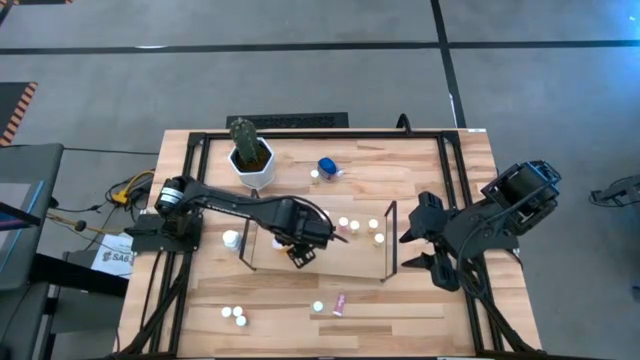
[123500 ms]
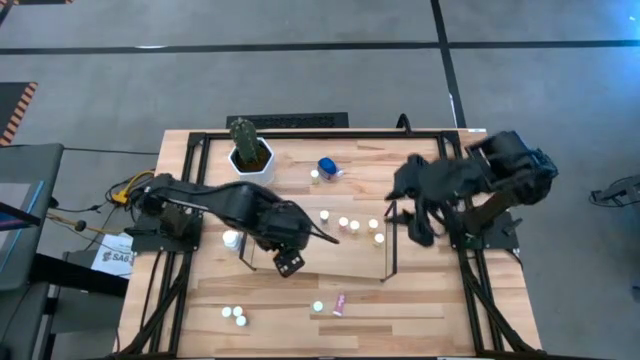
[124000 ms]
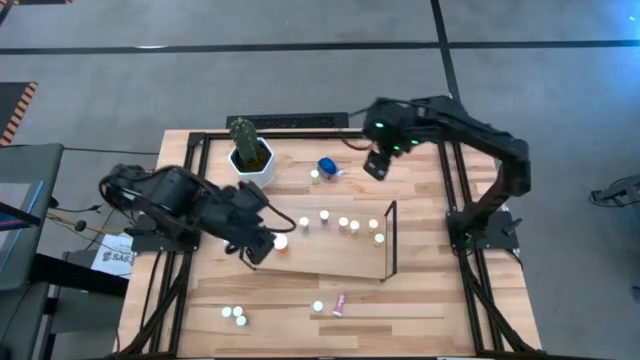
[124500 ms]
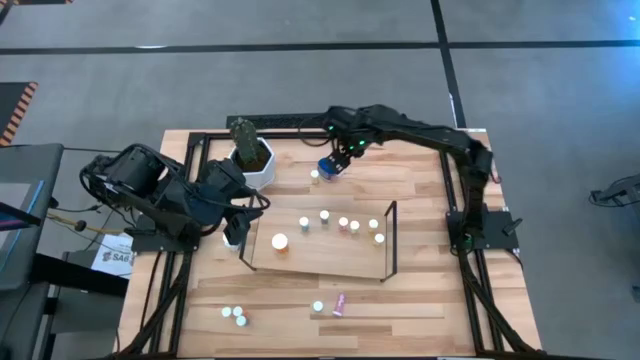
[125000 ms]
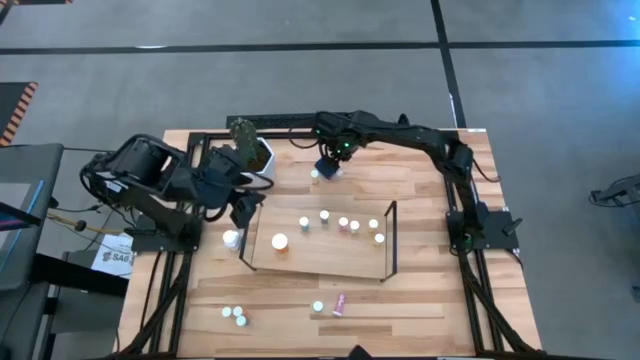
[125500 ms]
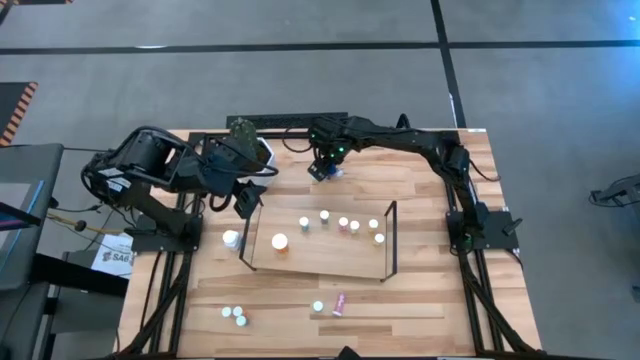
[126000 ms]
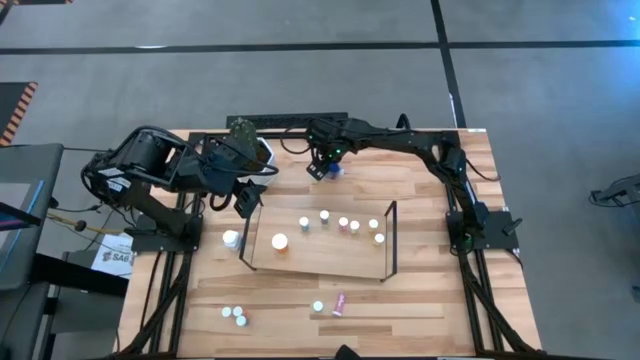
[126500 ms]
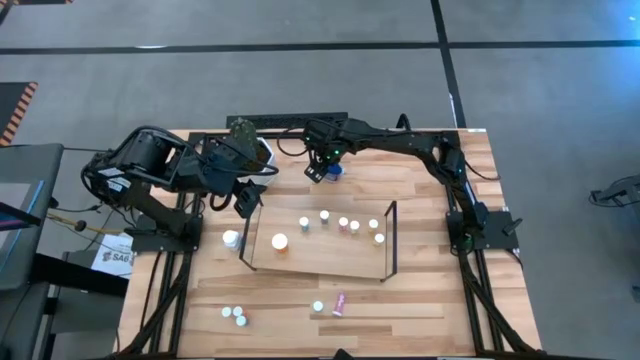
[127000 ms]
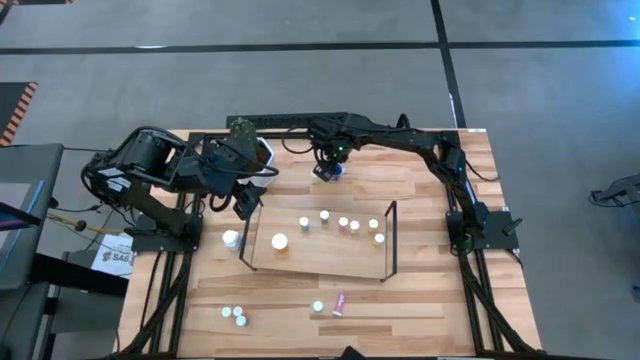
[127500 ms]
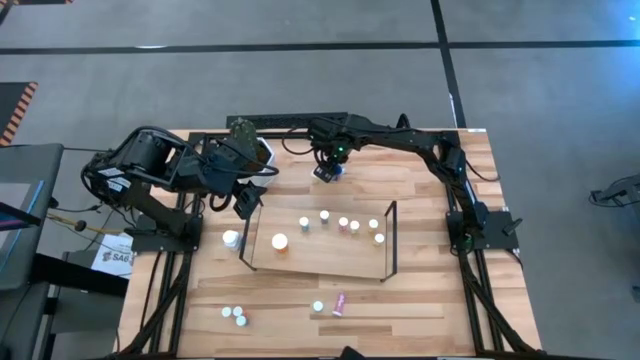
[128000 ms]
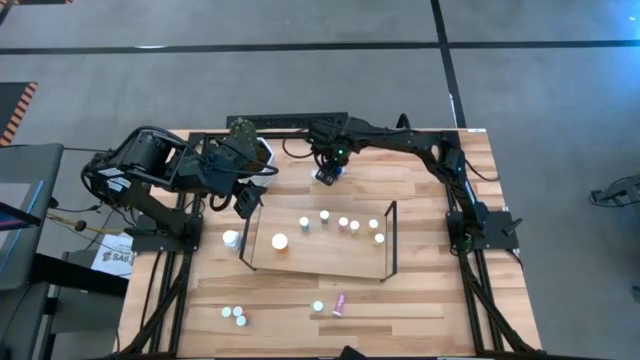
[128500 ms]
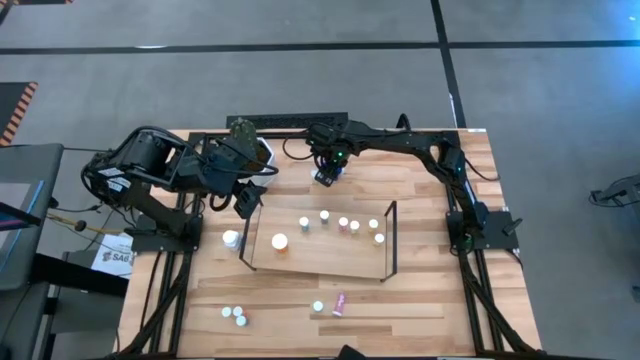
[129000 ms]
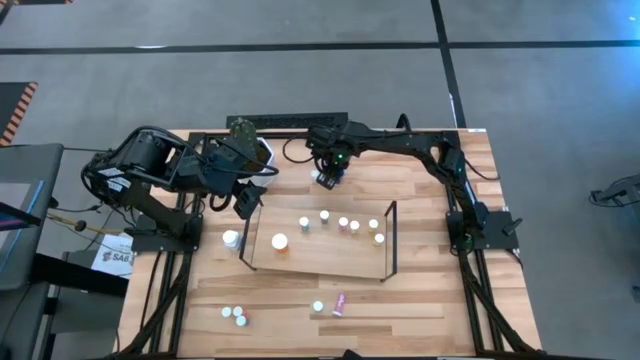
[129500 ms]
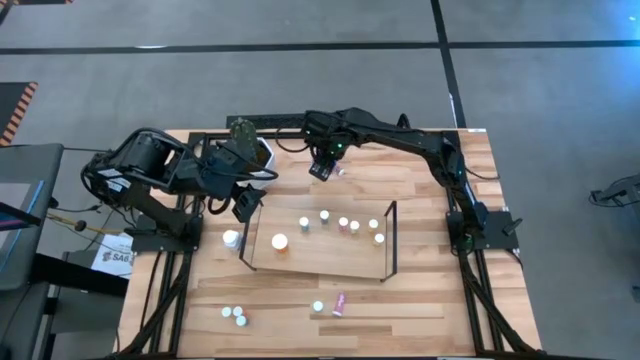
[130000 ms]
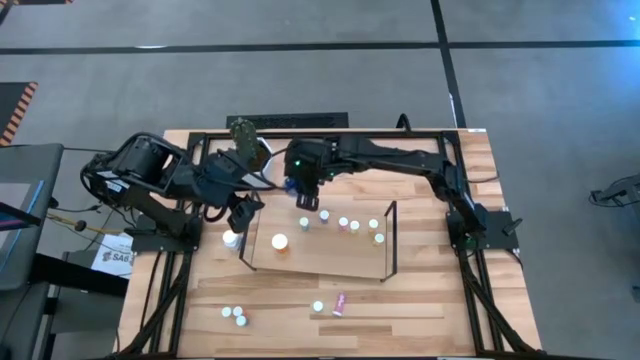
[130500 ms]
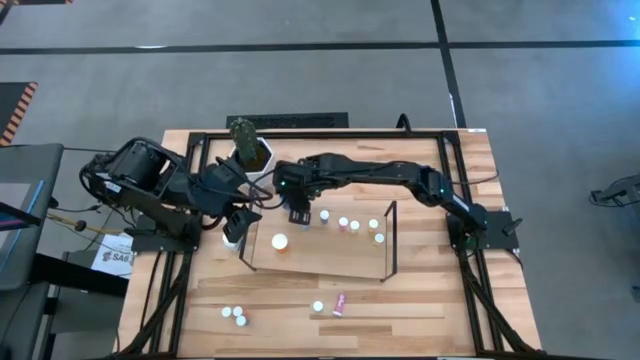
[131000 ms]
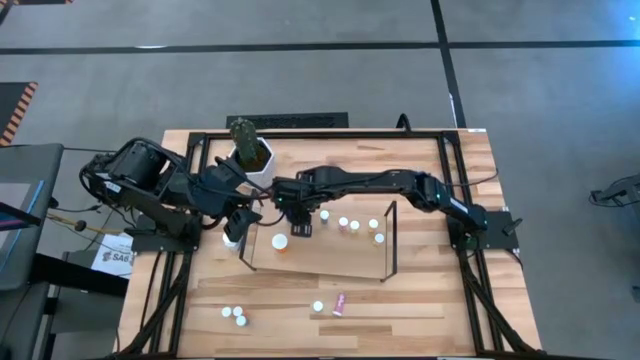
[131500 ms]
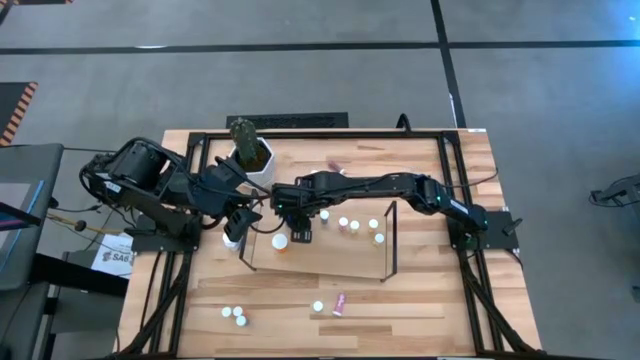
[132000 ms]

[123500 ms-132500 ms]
Task: Pick and place medicine bottles onto shelf by color
Put the large blue pill bottle on the shelf

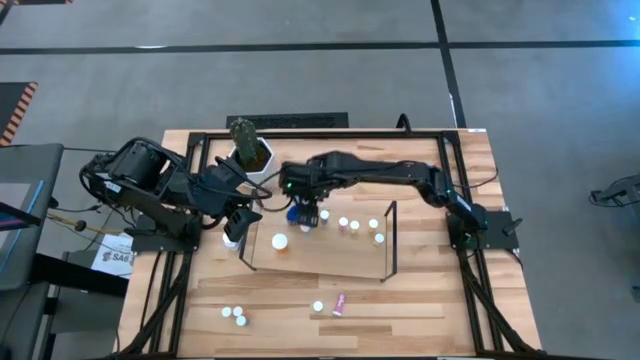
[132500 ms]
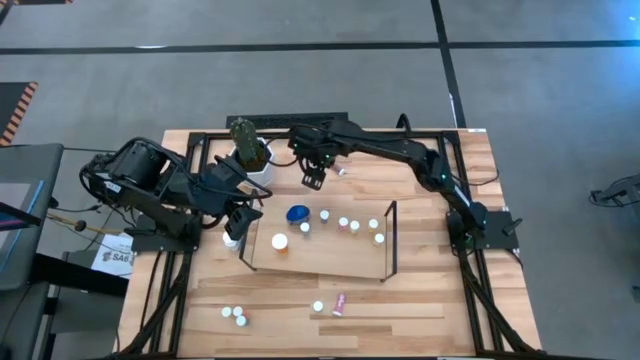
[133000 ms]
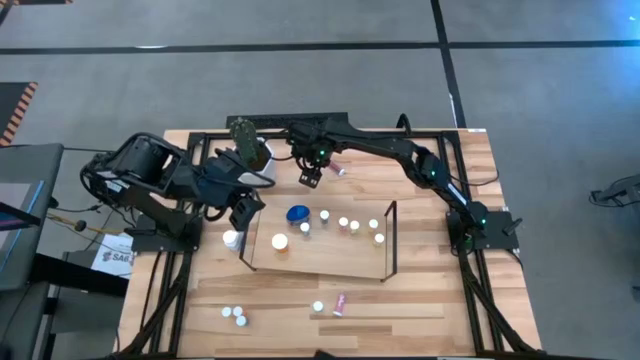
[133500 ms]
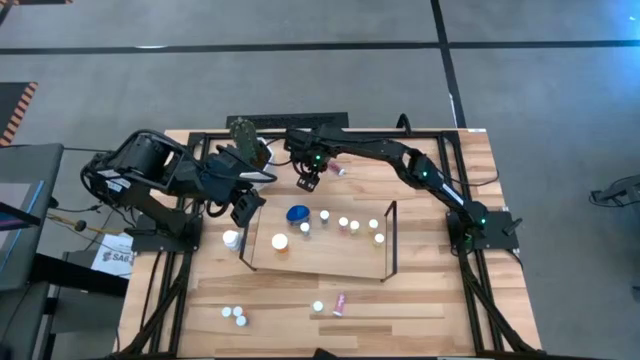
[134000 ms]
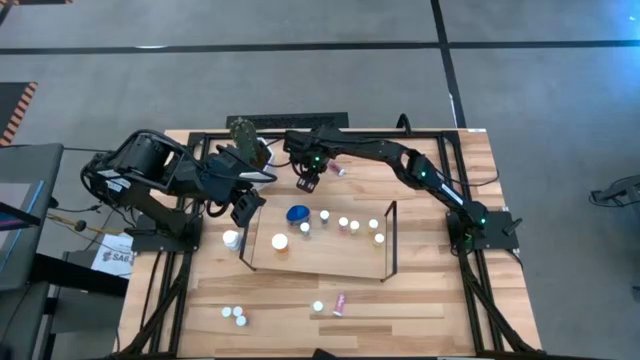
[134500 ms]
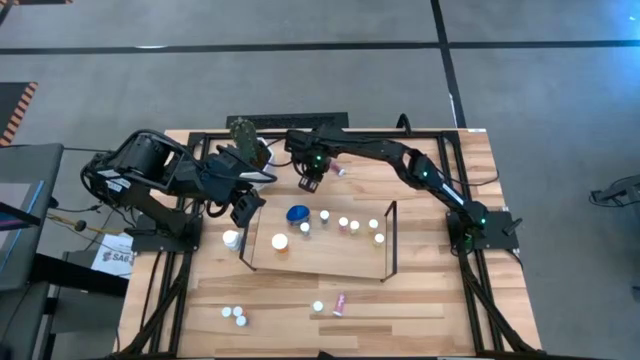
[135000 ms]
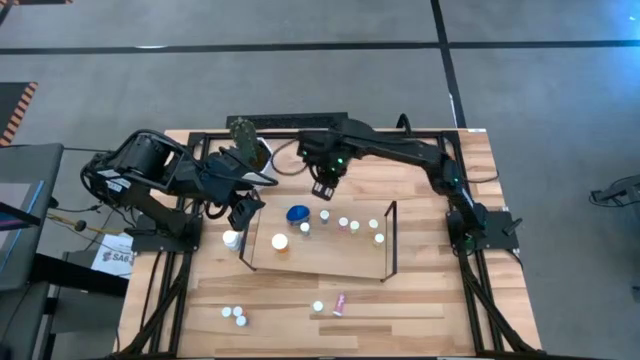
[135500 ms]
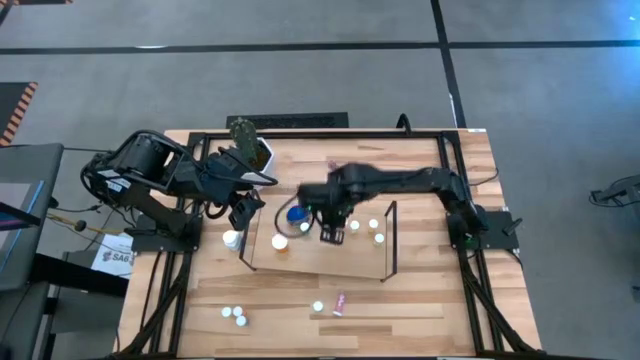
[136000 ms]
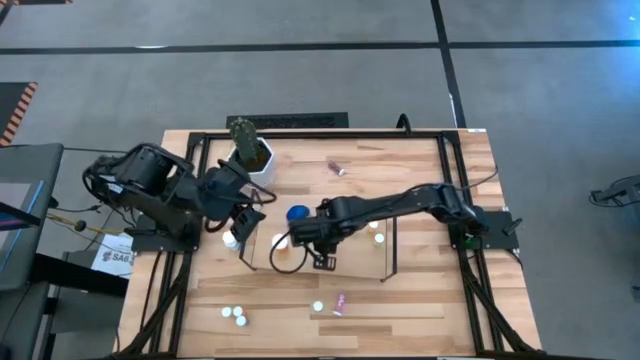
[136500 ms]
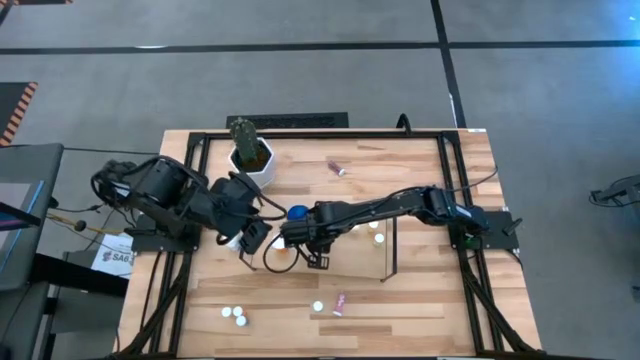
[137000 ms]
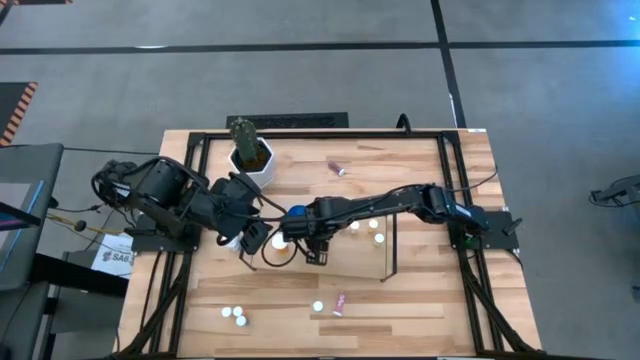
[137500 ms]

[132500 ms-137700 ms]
Put the orange pill bottle on the shelf

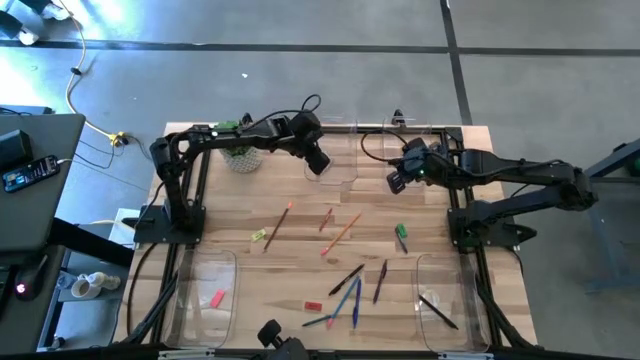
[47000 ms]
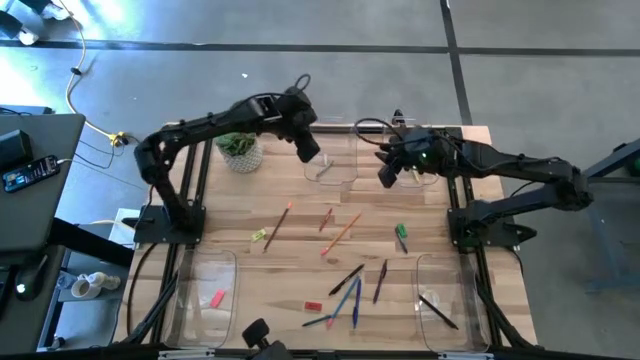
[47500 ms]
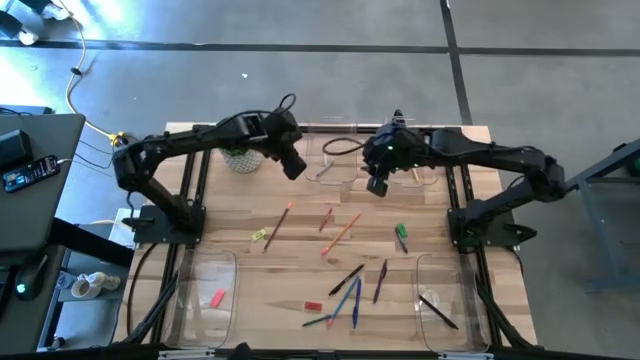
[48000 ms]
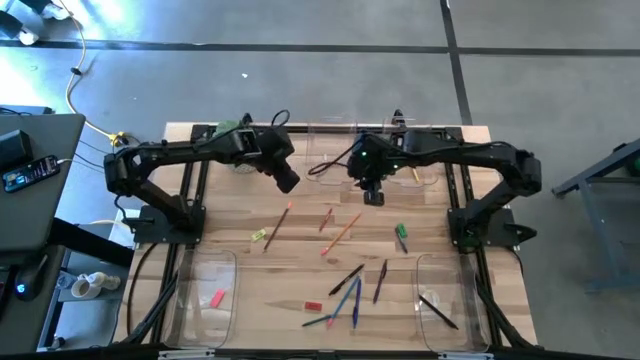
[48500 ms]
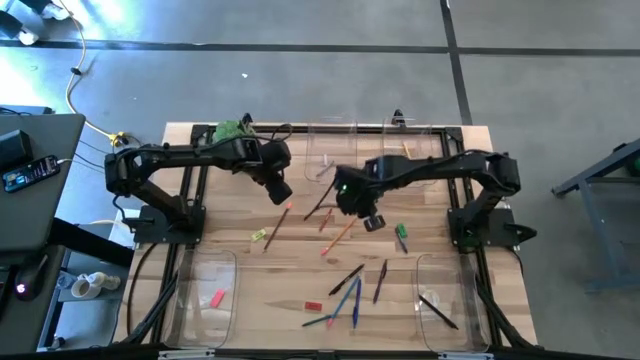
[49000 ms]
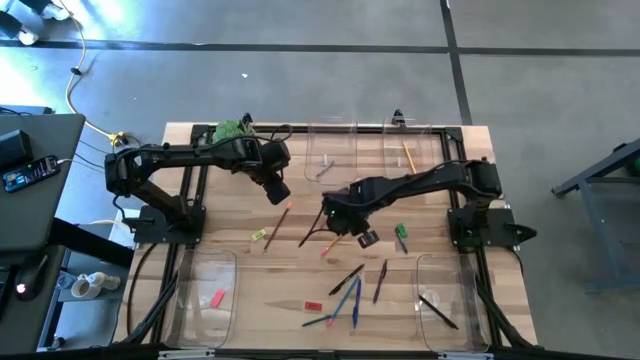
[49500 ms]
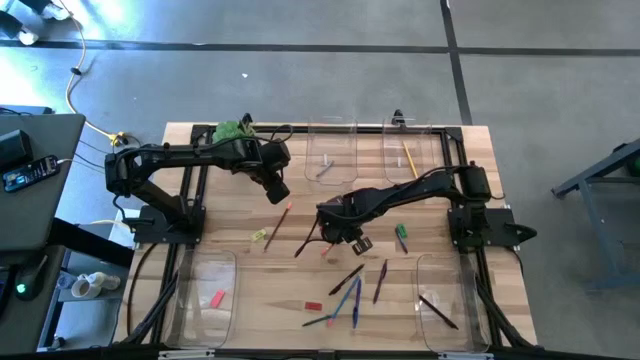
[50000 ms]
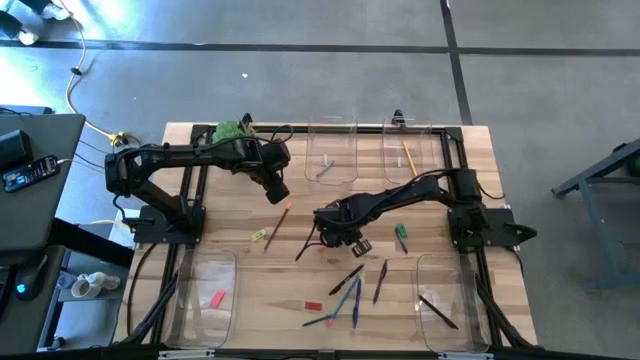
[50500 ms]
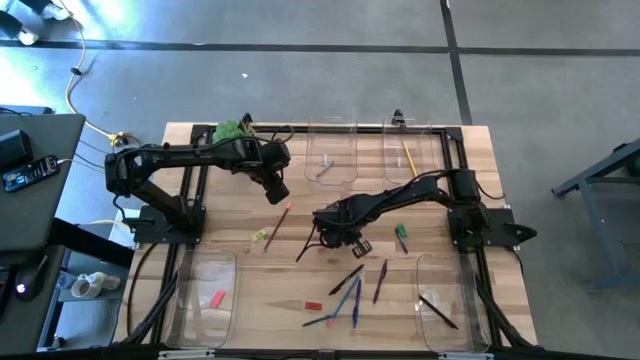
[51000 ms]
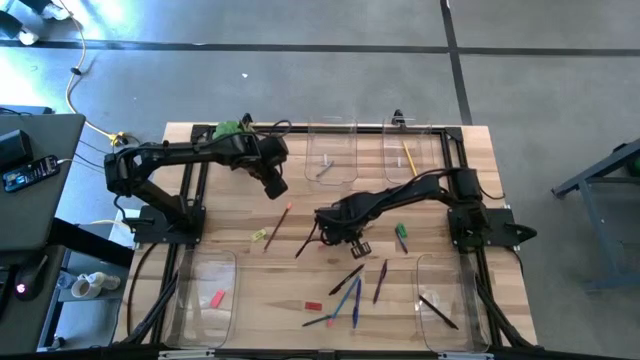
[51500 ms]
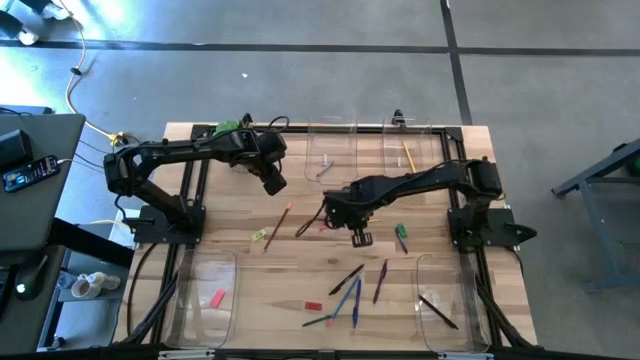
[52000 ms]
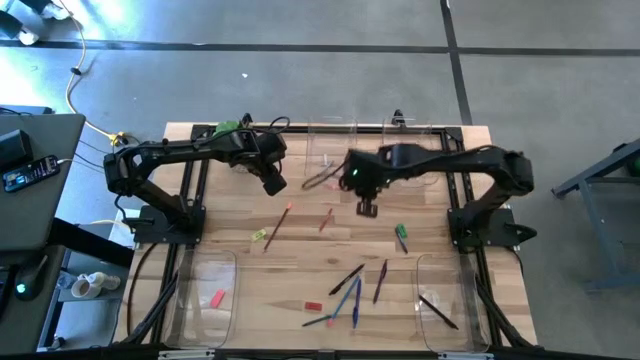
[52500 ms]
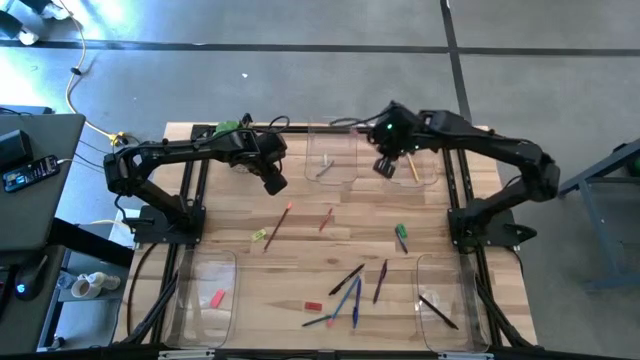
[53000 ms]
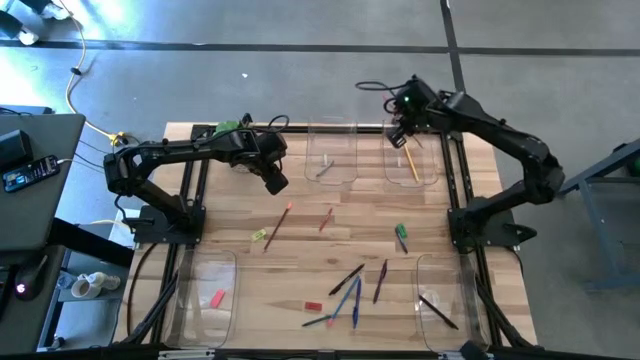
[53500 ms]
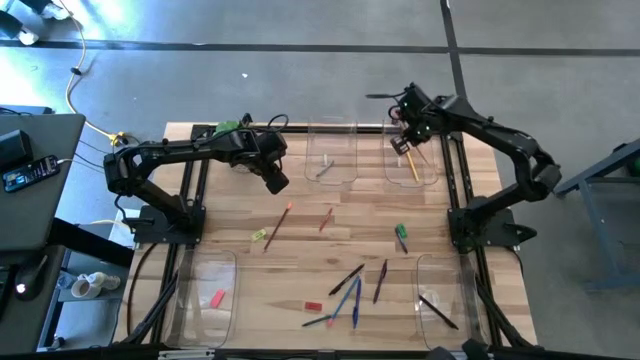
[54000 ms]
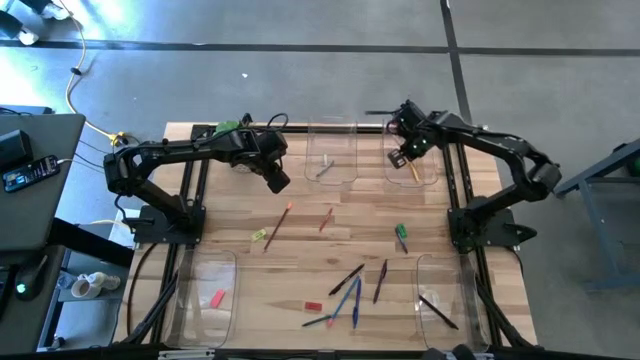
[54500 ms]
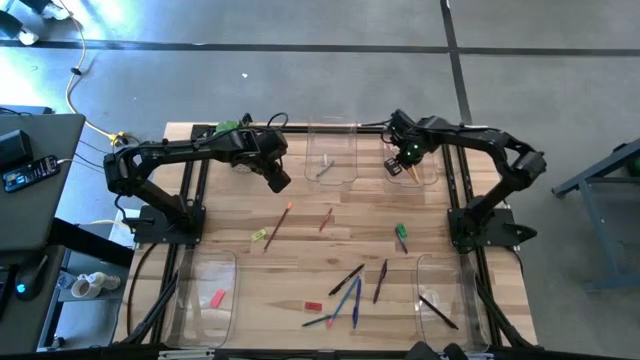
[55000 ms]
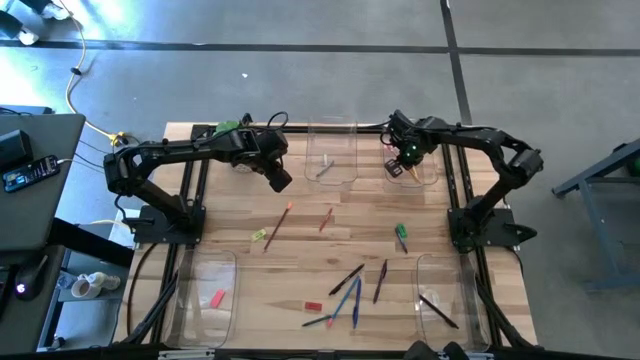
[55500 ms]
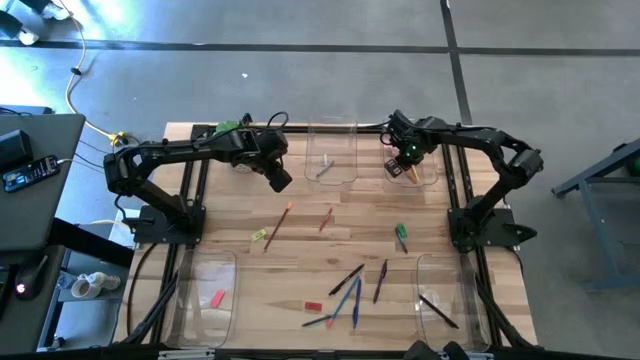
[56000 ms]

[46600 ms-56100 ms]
Task: Sort crayons/erasers/pens/pencils in bins
Put the orange pencil into the top right transparent bin
